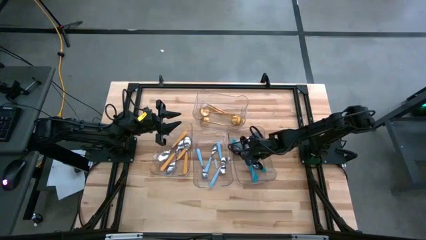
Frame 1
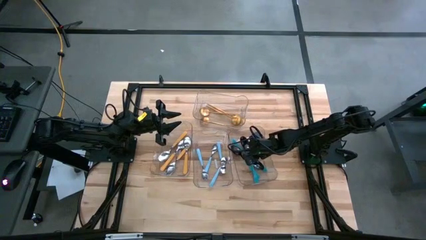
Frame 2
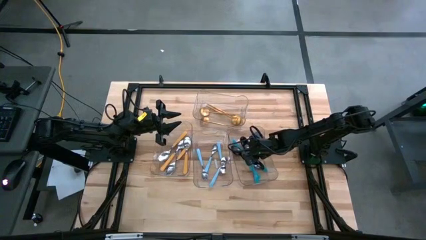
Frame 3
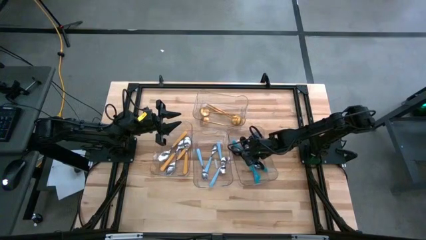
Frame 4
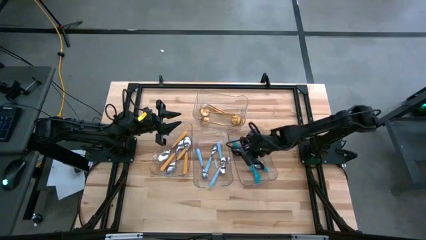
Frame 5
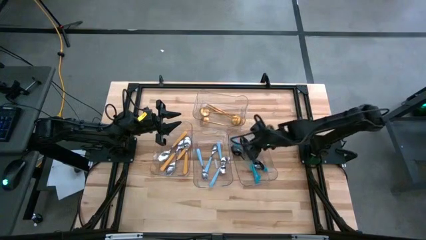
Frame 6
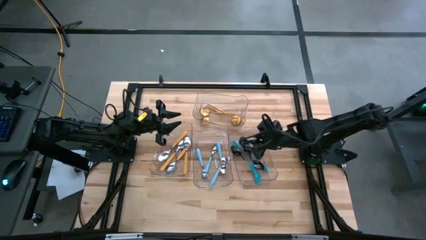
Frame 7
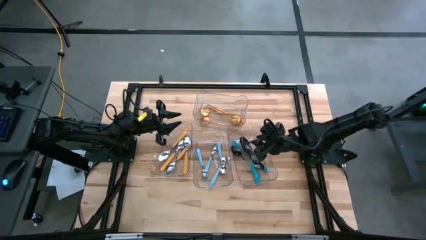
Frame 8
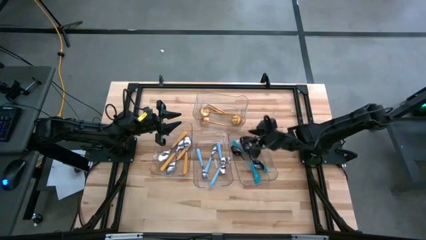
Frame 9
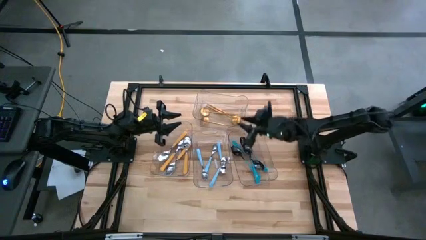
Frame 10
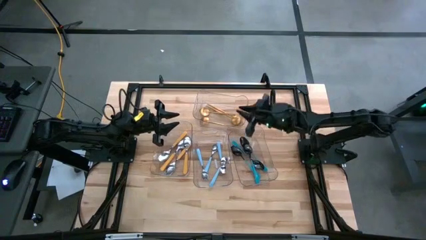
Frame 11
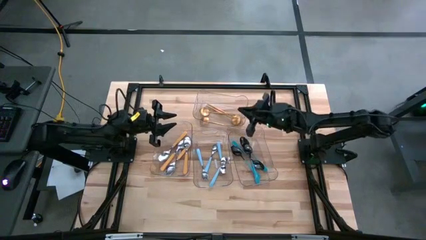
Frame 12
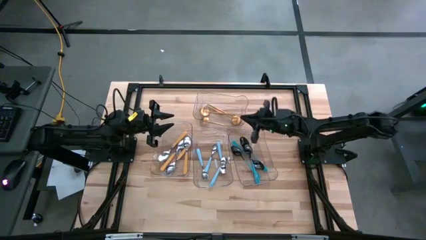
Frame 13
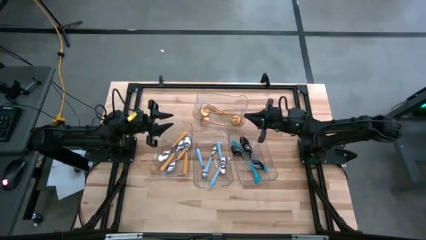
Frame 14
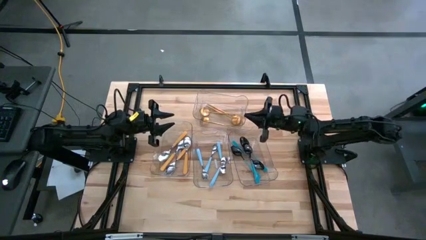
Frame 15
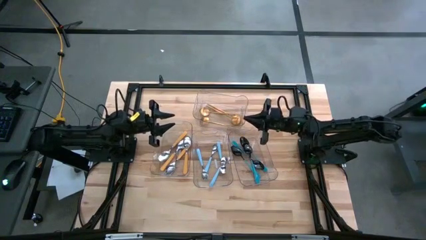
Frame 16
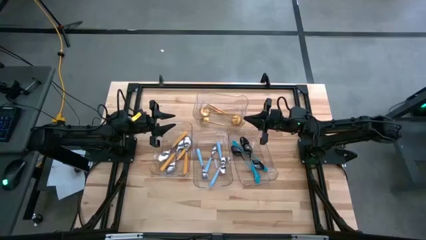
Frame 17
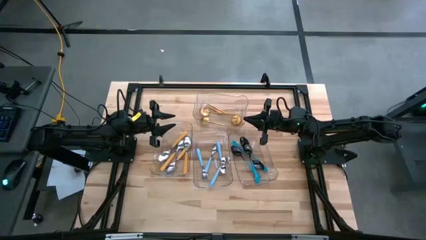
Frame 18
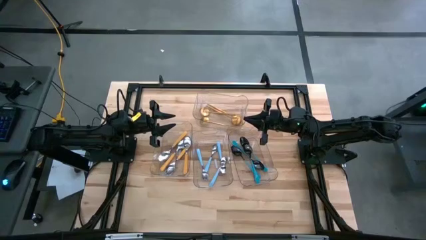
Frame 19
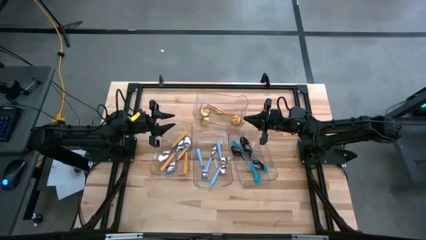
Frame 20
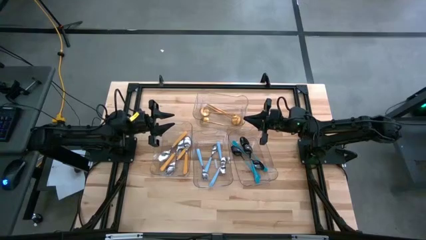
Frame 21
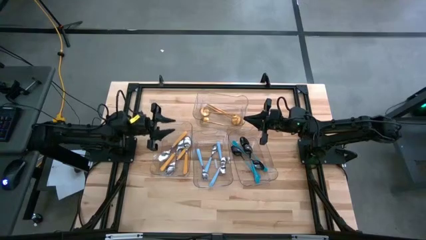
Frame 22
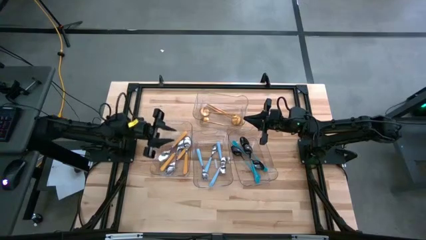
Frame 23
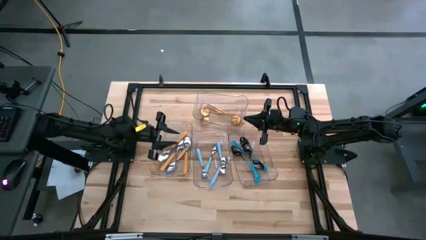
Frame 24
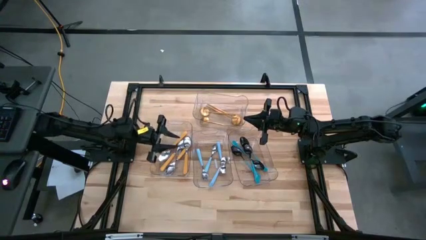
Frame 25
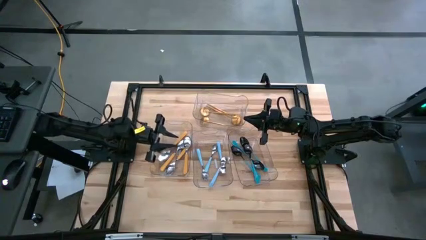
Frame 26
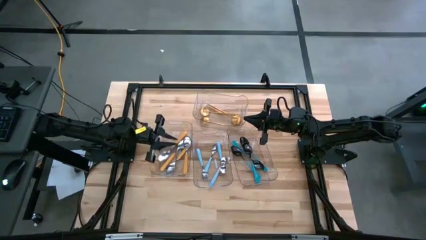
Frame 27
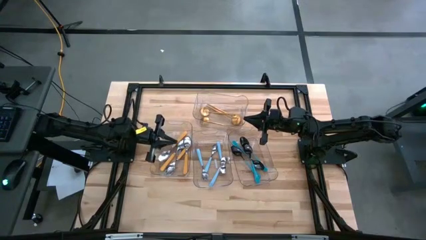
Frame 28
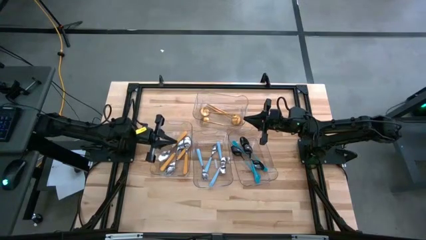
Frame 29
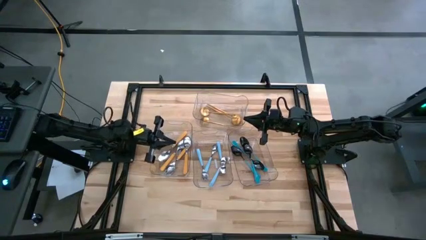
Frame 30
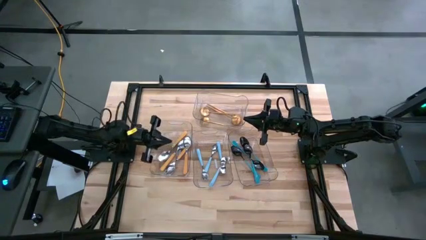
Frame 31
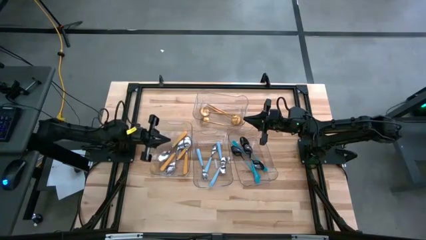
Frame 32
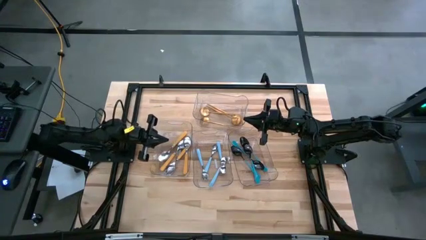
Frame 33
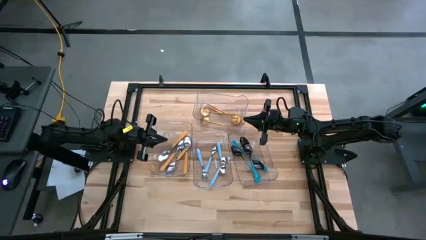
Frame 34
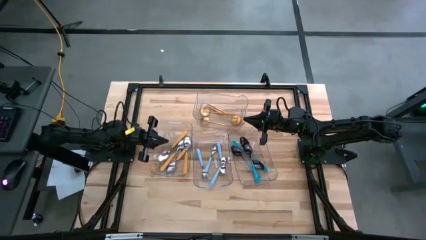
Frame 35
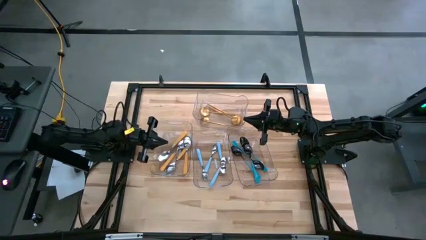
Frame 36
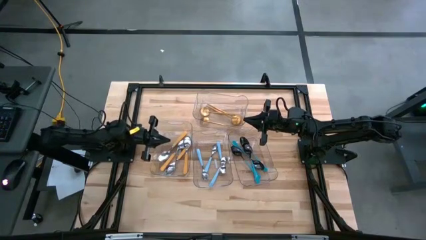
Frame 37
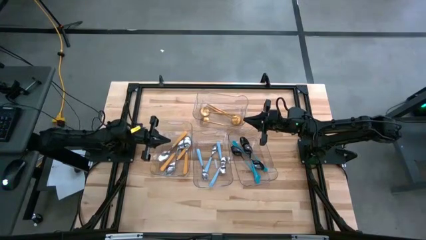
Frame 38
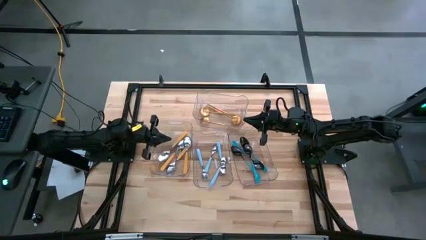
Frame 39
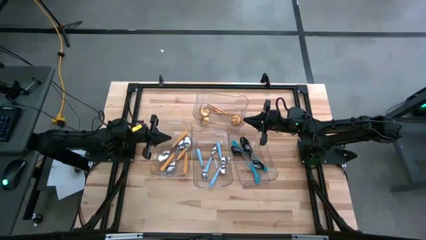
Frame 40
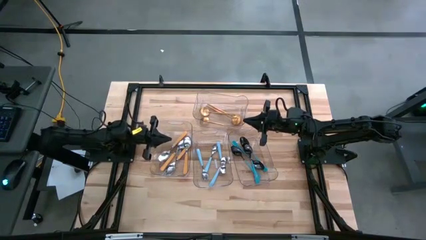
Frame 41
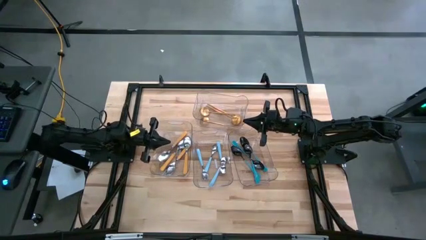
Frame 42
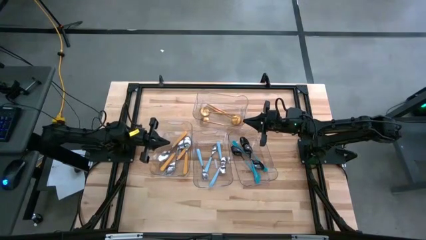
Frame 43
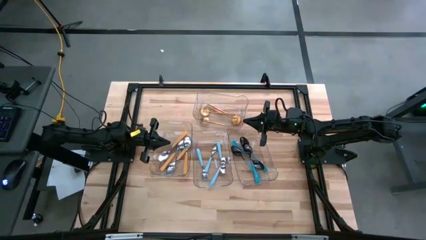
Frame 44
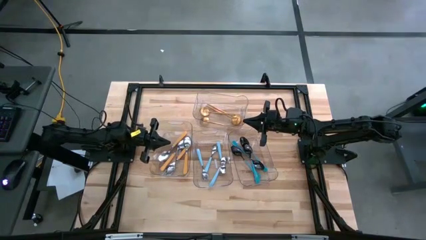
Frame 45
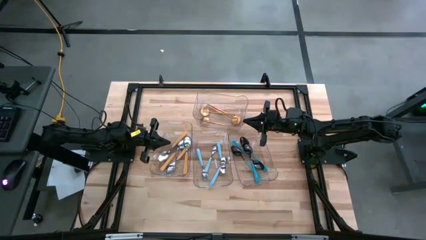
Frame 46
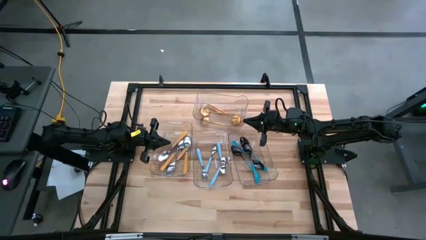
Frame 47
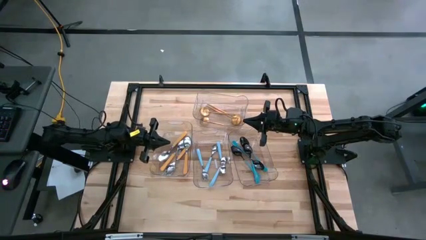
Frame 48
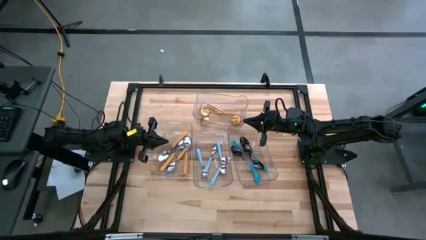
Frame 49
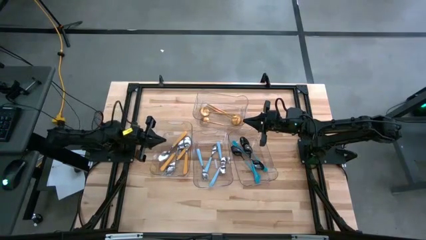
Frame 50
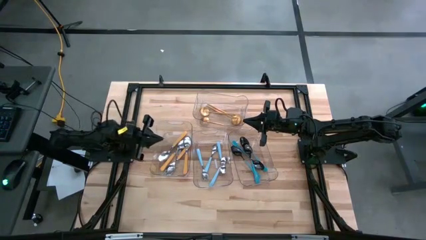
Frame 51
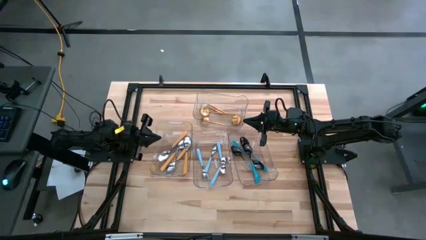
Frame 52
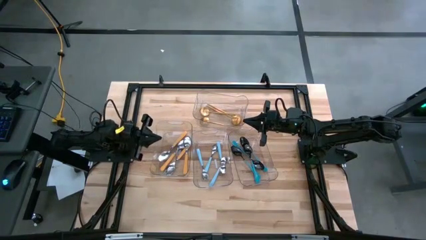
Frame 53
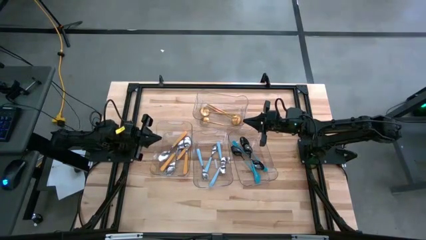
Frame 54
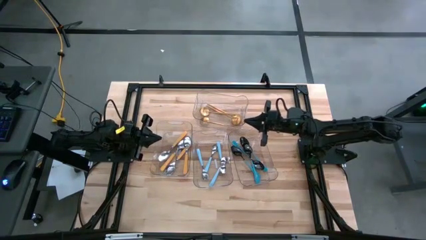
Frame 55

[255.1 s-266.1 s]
Task: Sort silverware by color (type)
Return to Home Position

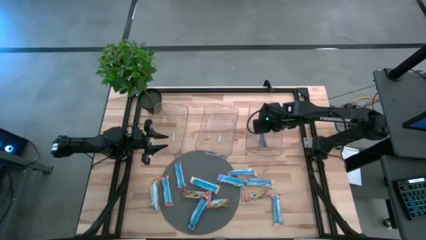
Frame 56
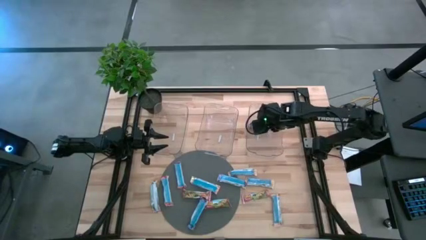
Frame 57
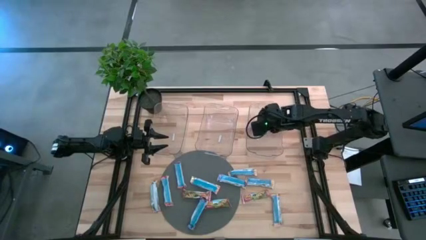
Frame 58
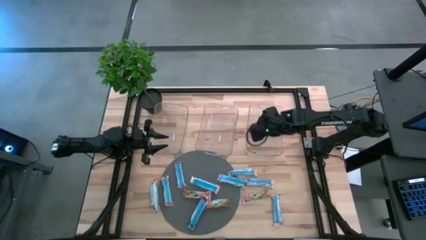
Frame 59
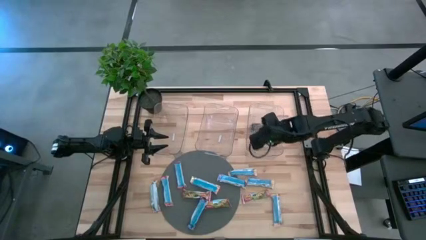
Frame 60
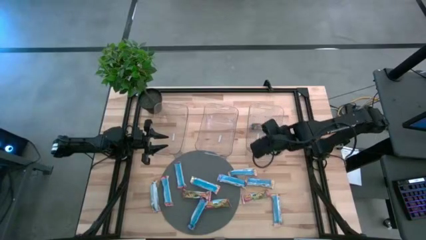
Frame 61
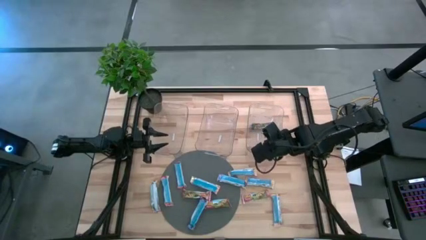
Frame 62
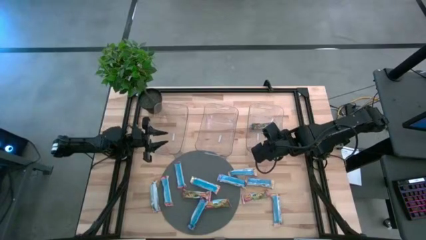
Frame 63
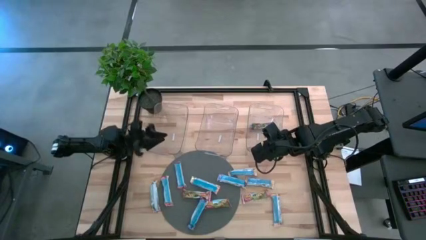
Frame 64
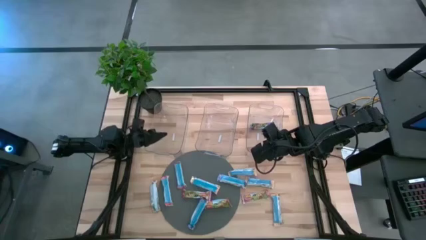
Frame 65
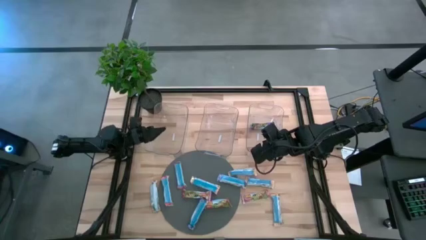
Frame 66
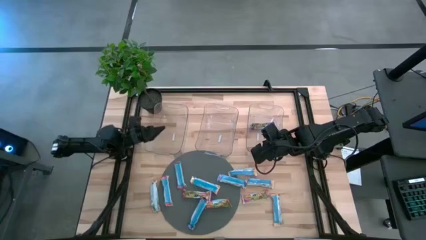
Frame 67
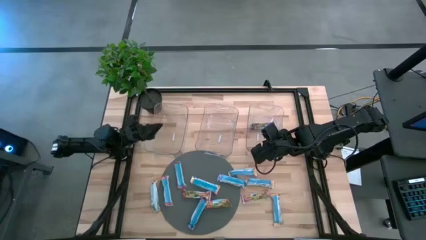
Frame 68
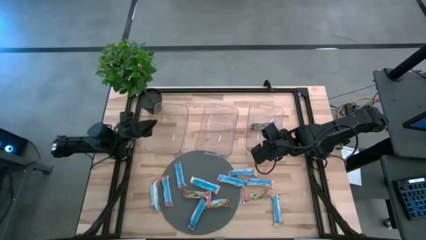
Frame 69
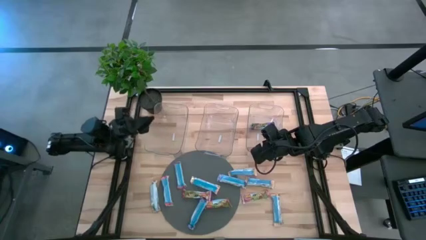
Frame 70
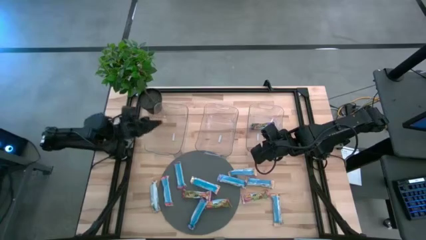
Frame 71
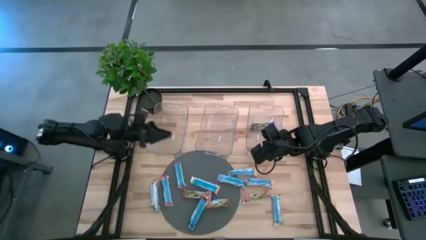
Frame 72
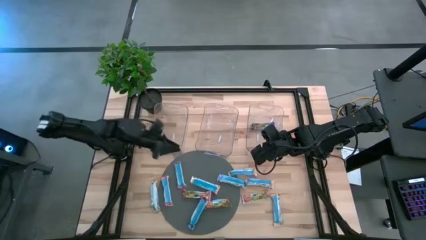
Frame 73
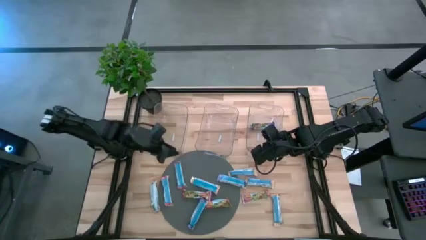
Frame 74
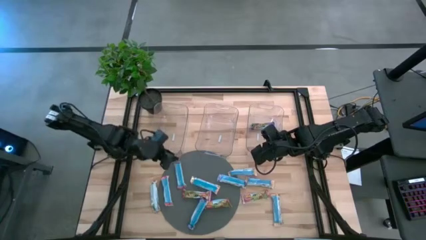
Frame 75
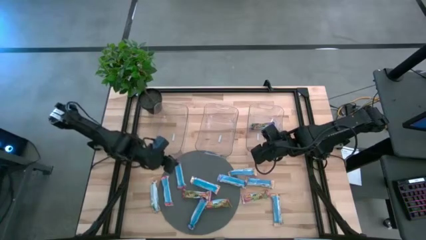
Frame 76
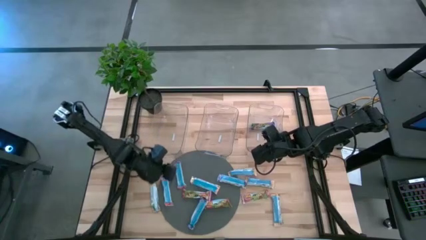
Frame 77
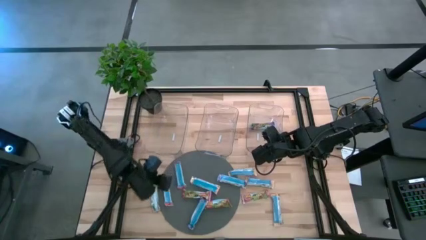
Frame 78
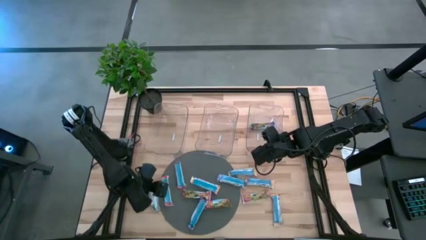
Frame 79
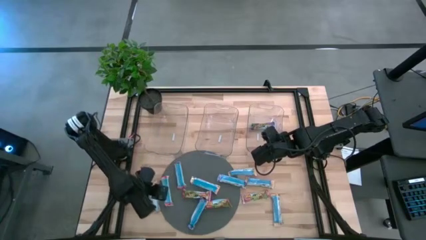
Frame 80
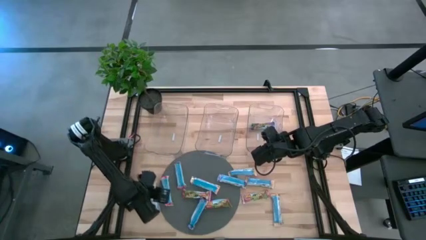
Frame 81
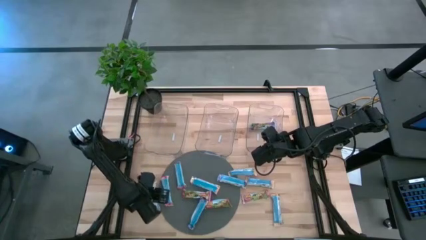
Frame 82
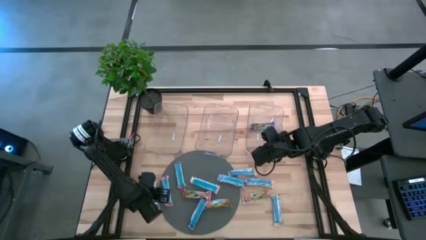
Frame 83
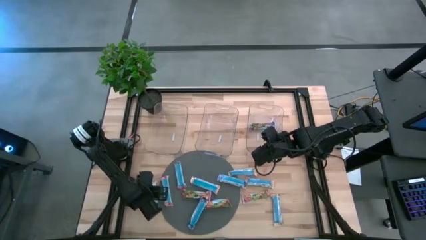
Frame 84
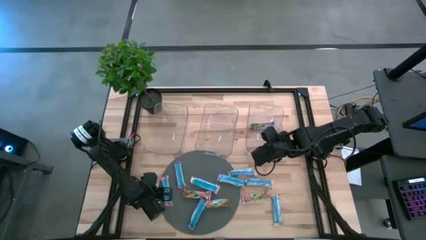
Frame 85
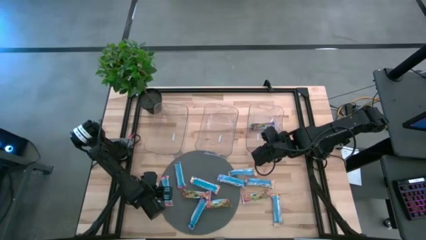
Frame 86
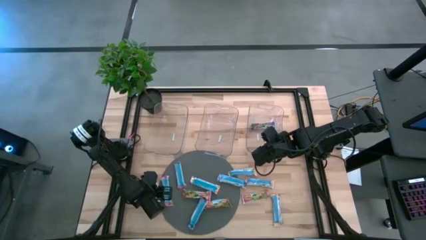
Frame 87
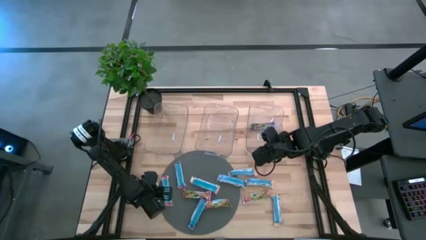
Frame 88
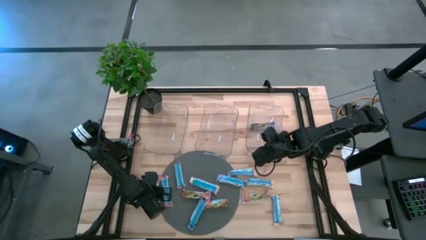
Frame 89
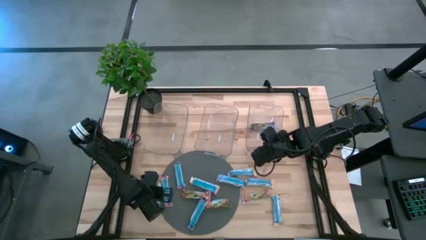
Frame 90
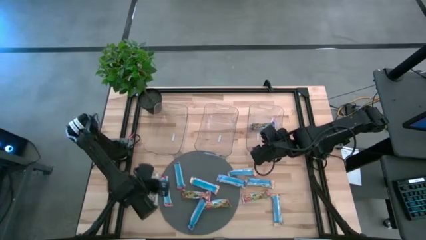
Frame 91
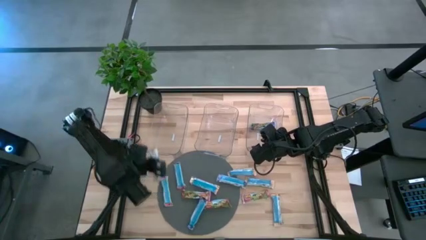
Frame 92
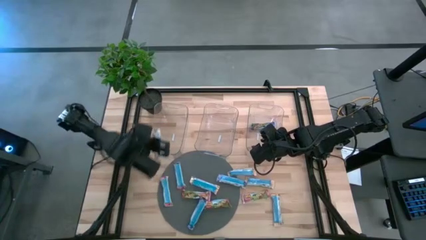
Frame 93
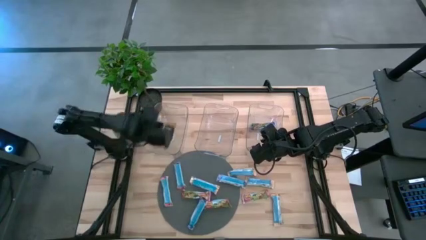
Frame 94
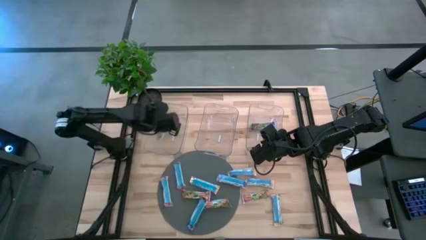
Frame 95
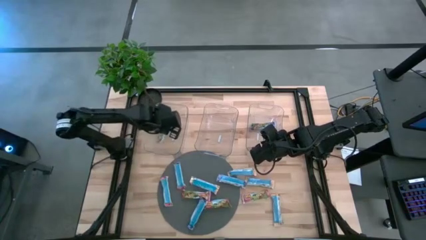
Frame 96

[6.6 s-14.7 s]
Task: Pick and place Granola Bars by type
Put the yellow granola bar into the left transparent bin
